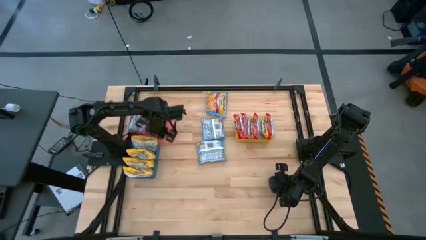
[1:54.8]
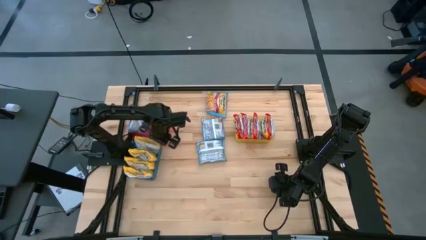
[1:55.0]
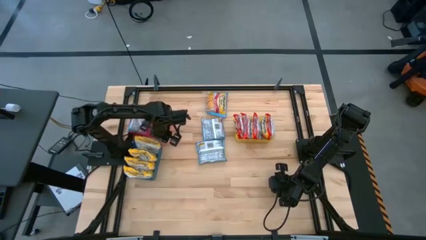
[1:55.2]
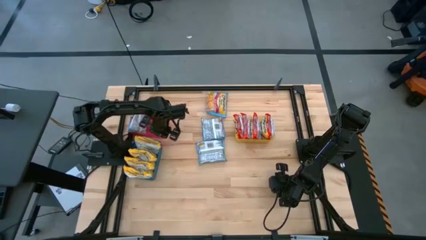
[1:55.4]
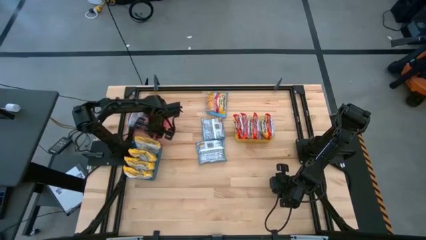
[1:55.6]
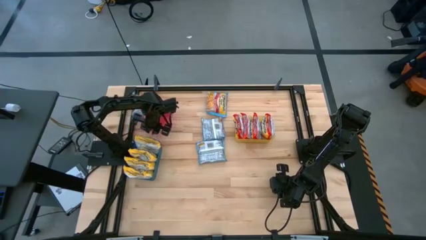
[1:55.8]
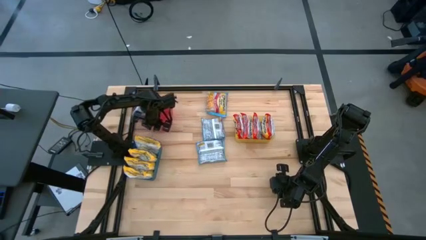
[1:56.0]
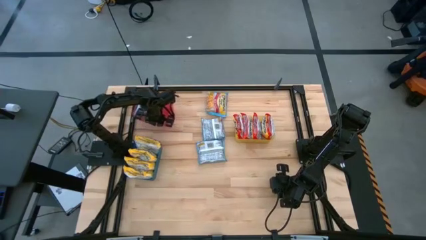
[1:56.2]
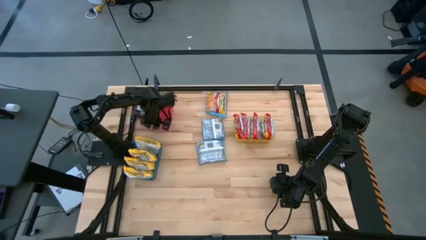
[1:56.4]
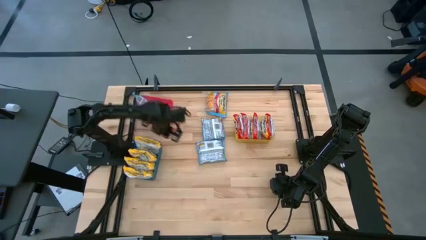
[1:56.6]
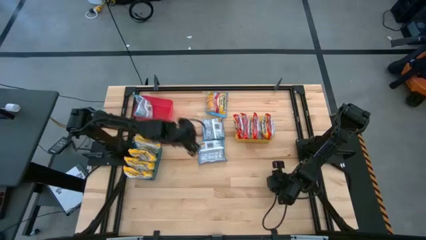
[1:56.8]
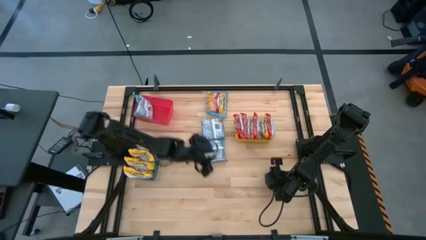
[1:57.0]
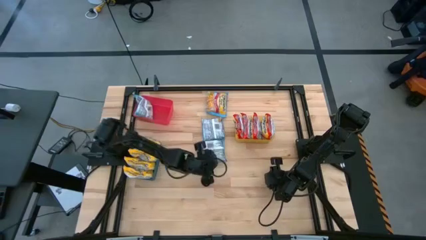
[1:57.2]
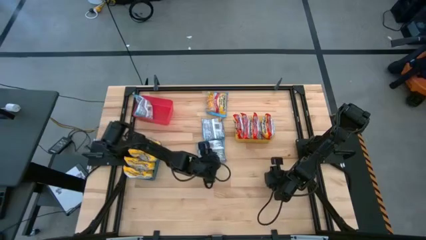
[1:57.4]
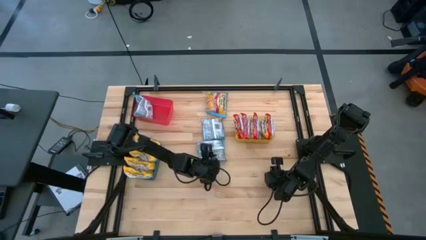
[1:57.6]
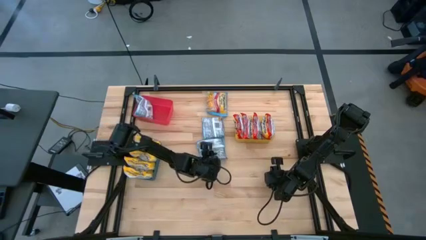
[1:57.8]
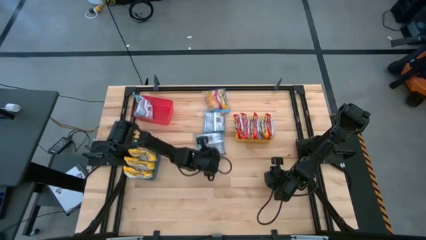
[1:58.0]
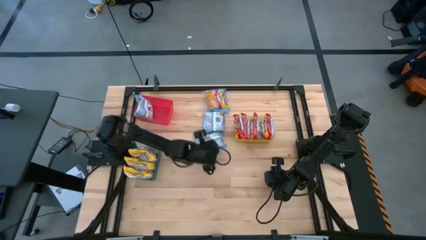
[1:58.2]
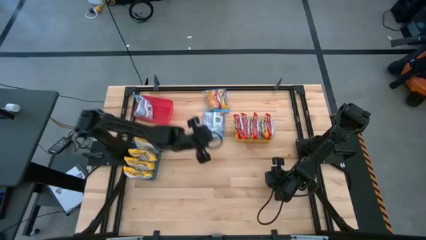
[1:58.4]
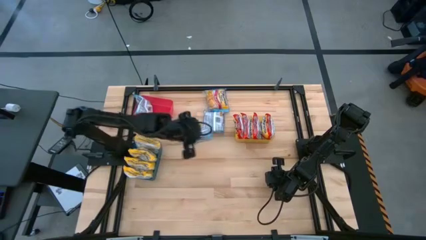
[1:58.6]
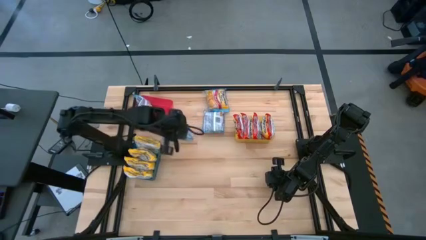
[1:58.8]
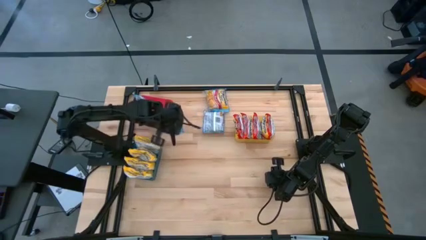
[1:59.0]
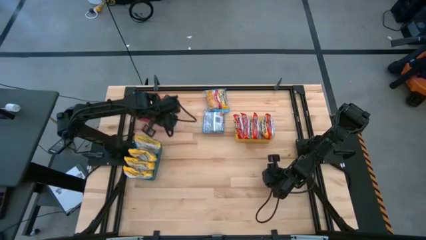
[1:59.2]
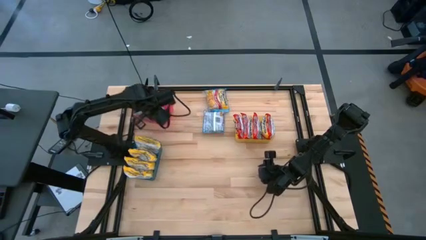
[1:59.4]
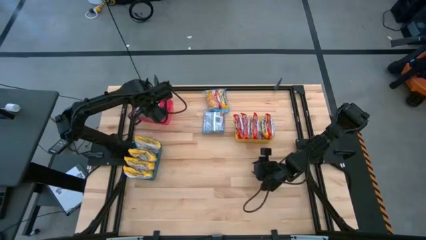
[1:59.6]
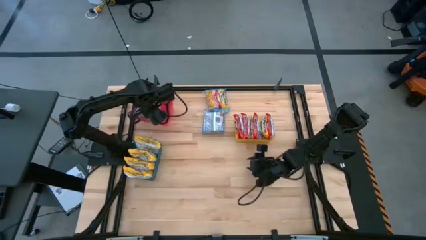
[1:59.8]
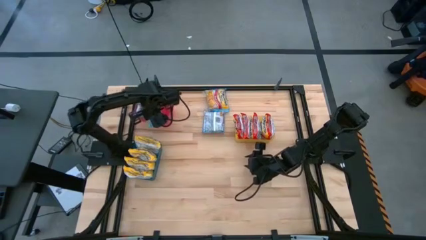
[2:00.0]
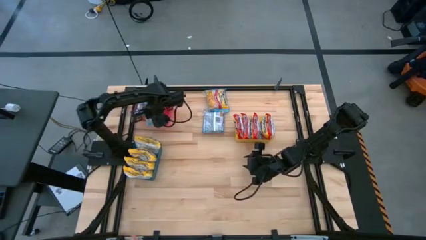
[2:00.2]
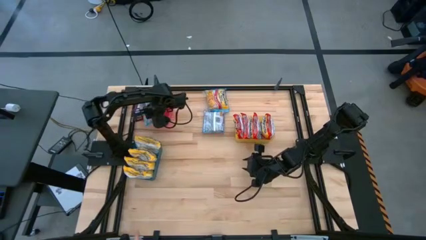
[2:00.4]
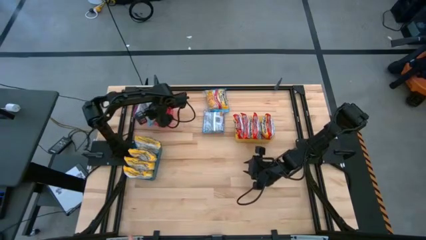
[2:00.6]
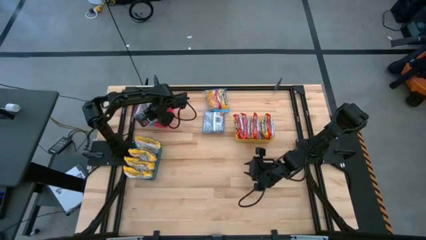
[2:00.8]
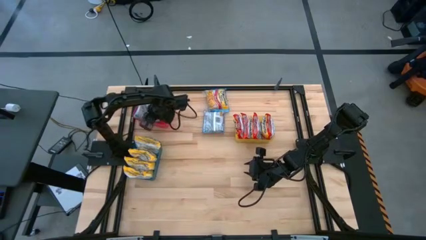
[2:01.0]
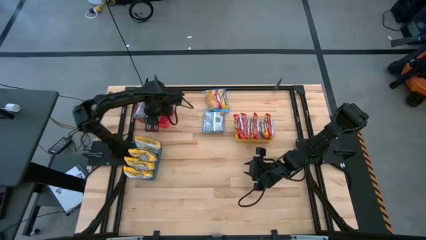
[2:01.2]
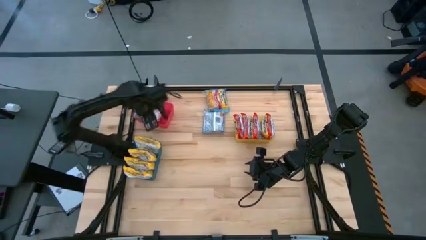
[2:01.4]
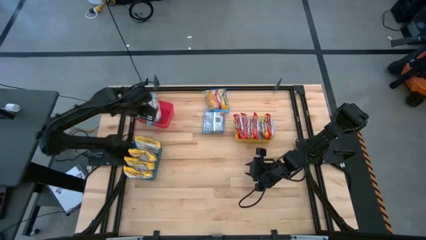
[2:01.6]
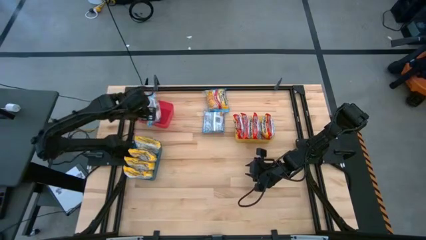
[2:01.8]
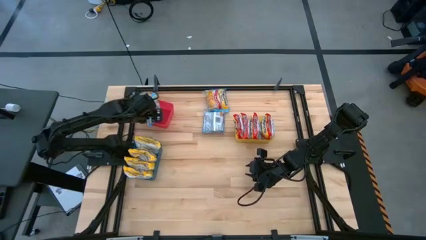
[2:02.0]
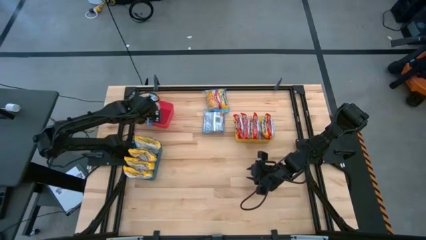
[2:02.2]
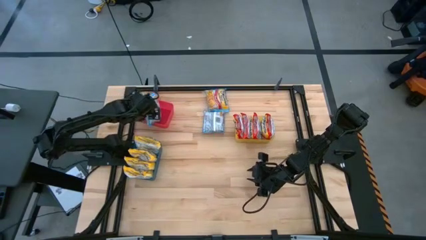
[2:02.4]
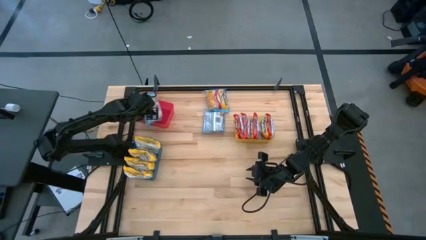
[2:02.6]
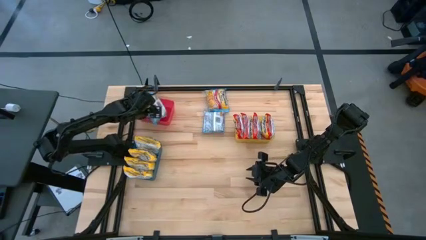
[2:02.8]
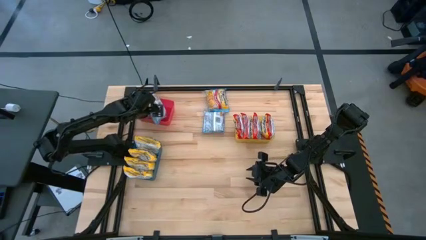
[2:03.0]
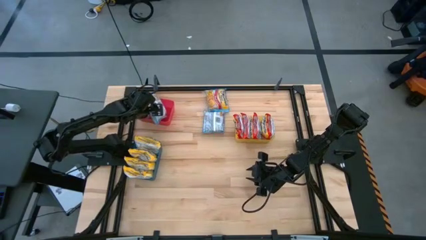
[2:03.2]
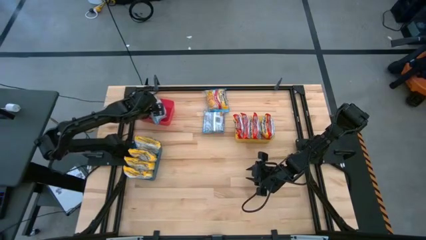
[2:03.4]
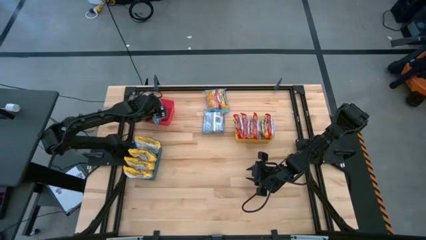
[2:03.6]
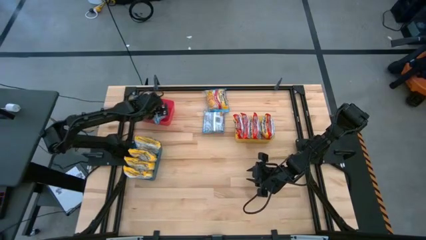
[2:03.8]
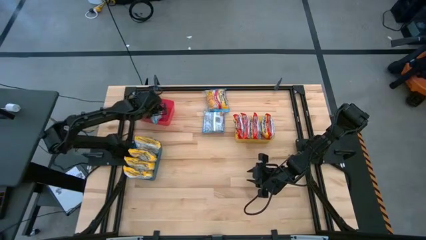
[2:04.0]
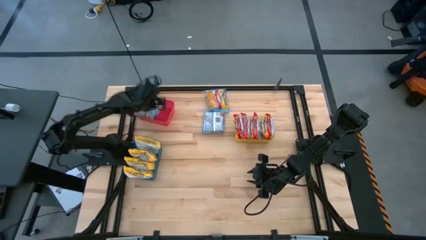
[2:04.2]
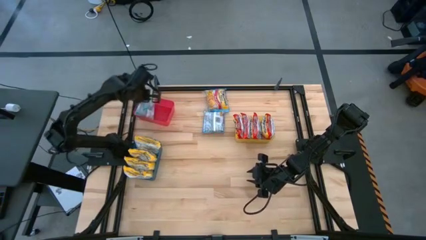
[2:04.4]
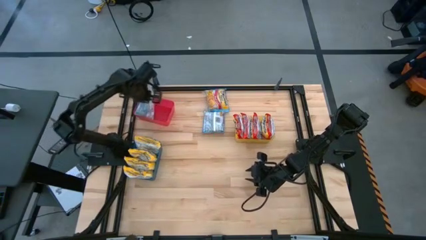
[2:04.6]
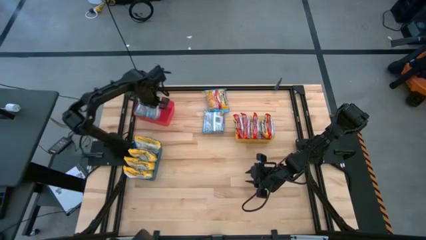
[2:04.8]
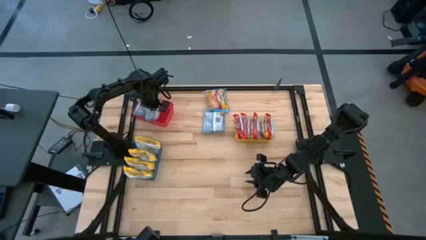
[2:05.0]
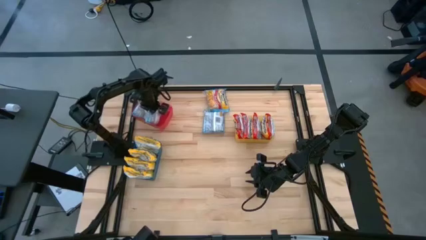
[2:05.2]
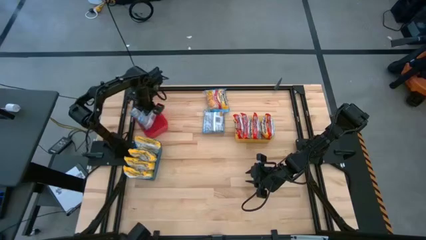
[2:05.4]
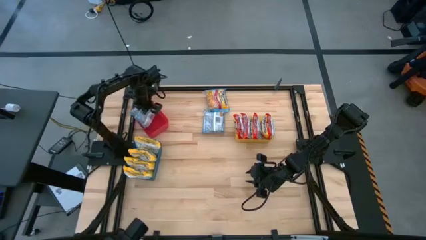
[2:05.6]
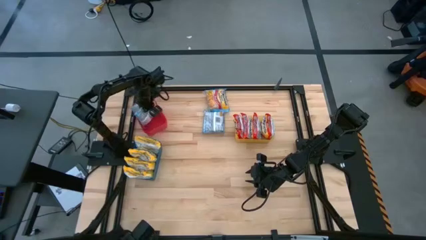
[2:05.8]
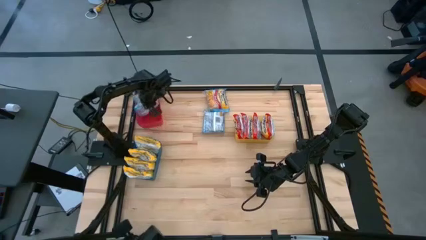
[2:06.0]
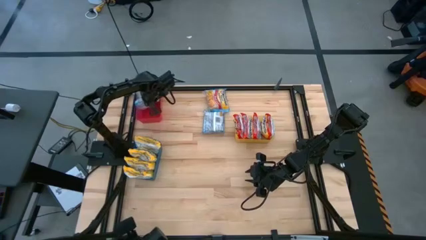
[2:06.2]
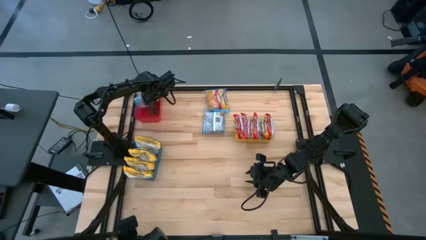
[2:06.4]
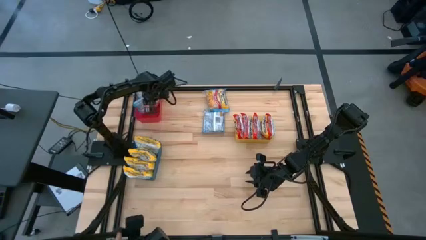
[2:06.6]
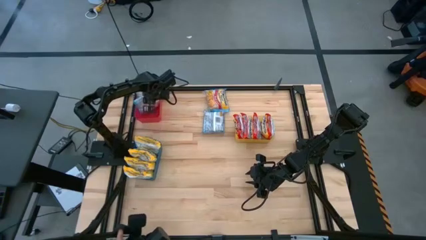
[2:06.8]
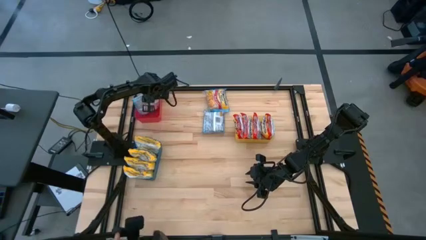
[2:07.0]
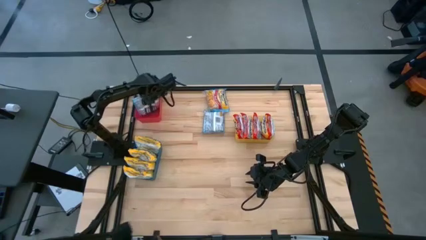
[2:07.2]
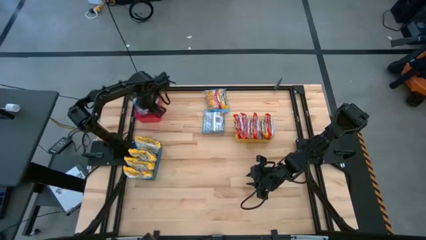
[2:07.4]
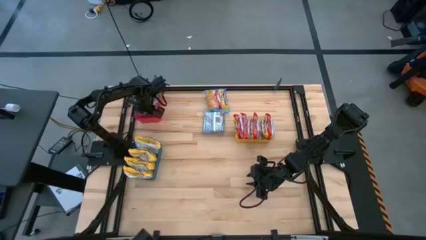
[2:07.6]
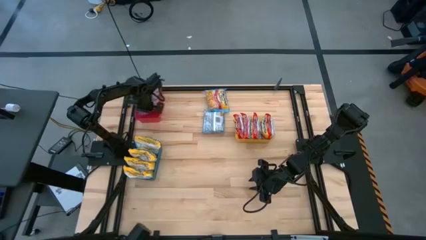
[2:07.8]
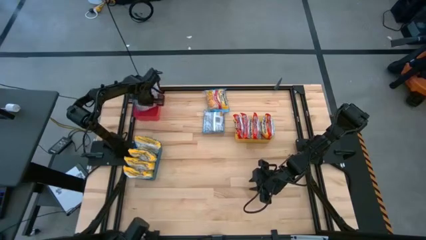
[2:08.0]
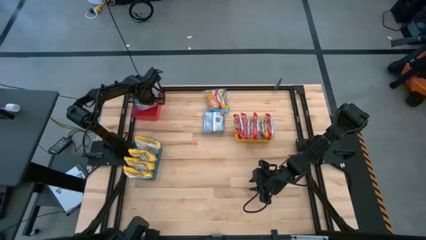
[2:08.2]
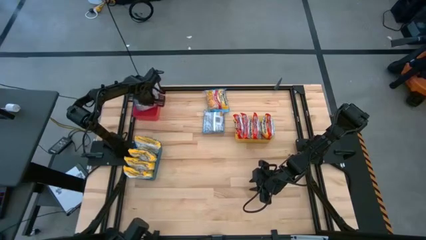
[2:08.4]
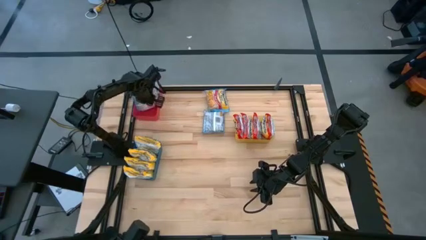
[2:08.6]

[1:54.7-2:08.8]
Task: Sort Maruchan noodles
Put the blue noodle pack into the red bin

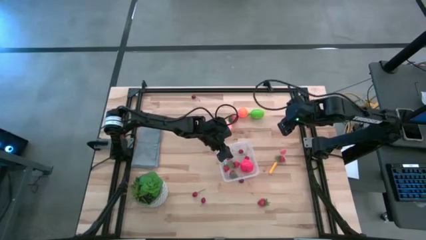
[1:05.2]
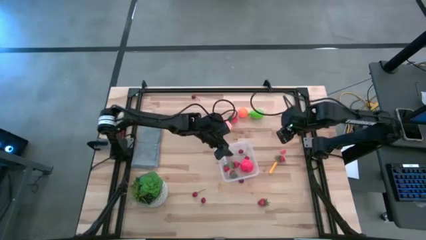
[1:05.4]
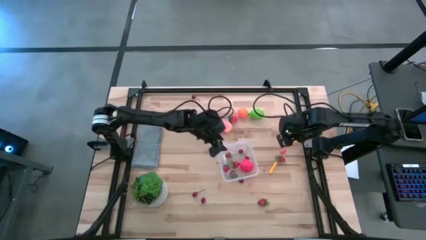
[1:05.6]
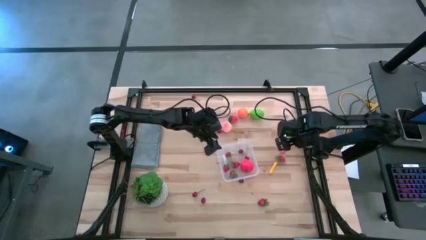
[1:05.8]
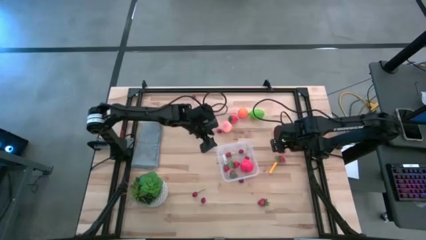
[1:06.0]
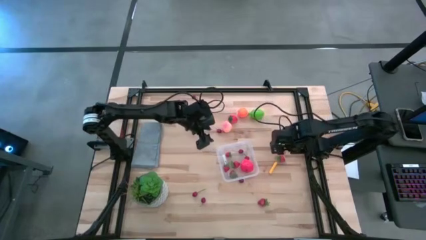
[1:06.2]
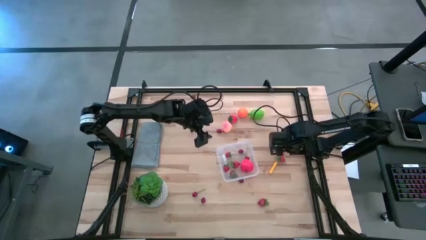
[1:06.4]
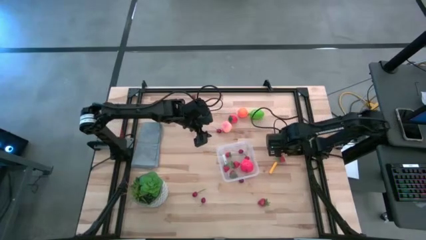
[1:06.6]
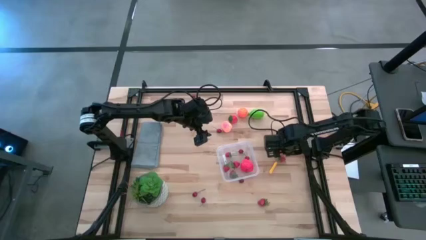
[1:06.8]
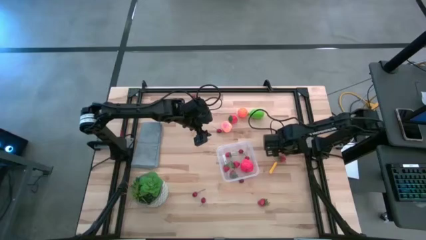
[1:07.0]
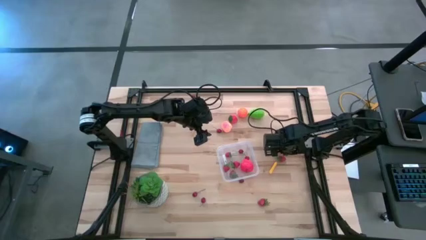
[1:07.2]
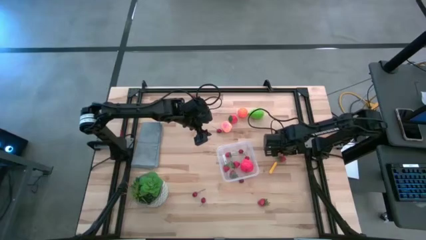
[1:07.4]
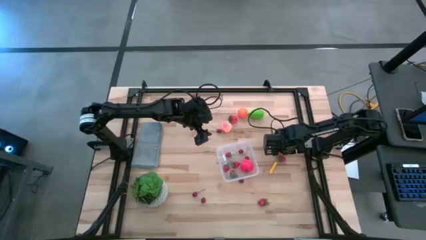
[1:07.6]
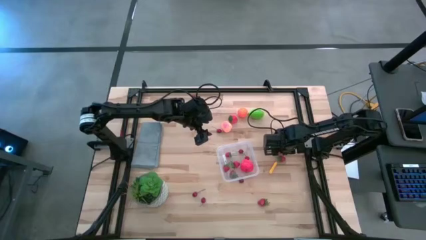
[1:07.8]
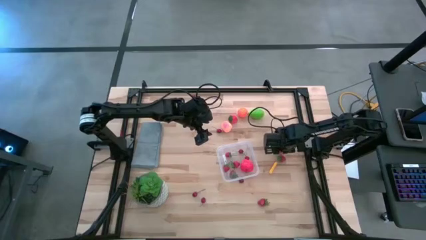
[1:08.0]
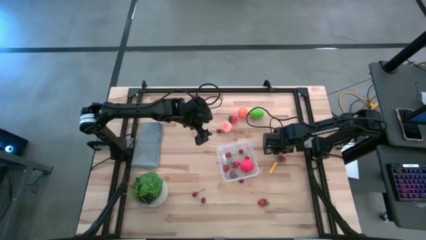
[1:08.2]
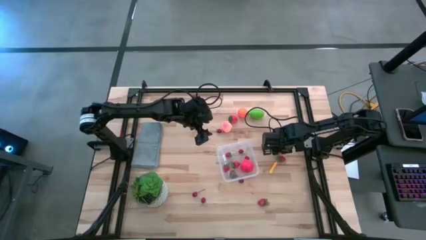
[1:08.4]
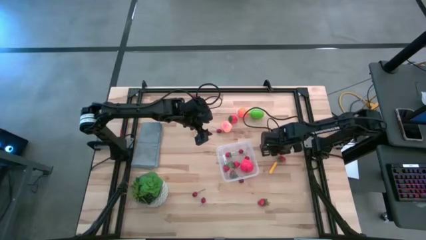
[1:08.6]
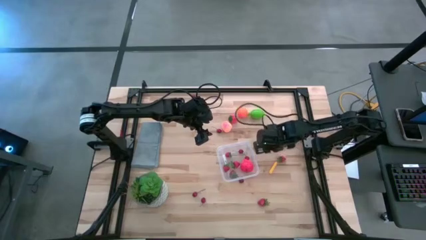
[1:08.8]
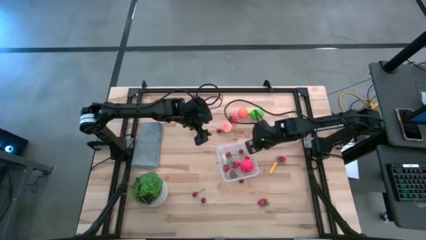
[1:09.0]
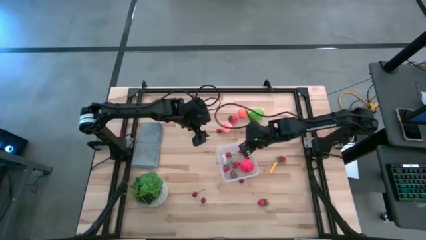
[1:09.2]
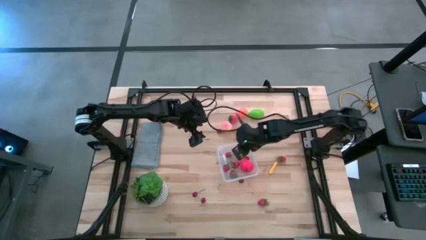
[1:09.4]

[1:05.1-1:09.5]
Task: Pick and placing Produce into tupperware
Put the bottom peach into the transparent bin
